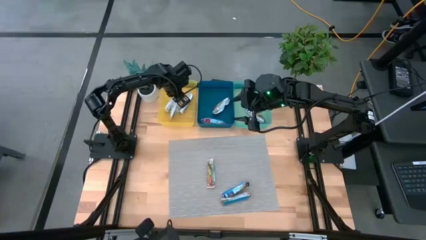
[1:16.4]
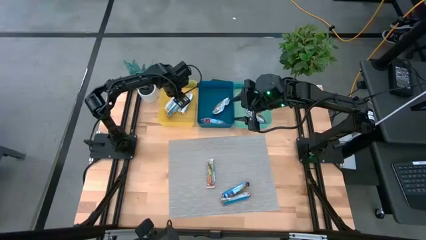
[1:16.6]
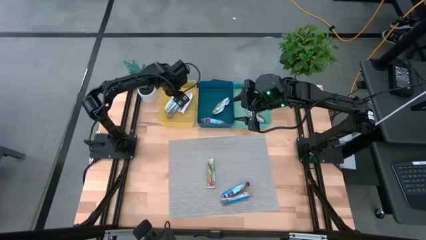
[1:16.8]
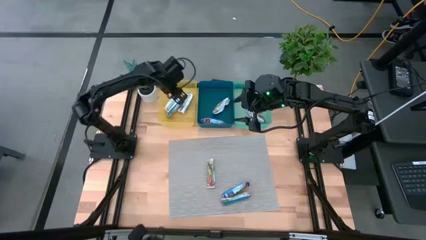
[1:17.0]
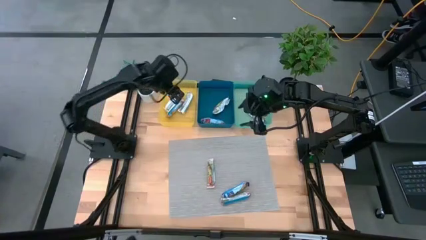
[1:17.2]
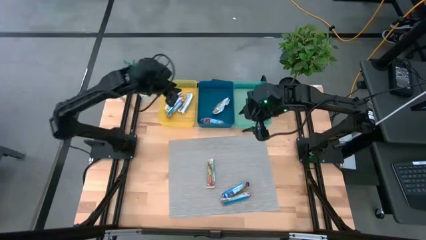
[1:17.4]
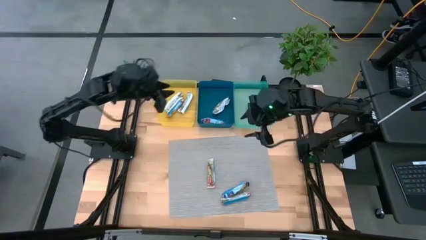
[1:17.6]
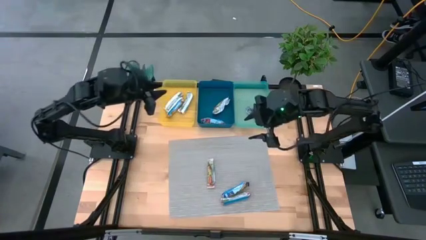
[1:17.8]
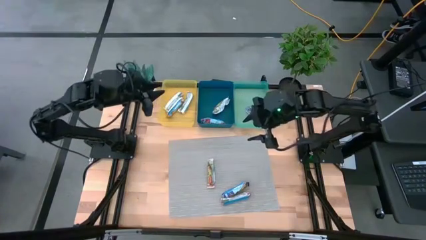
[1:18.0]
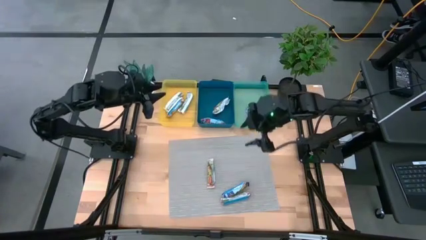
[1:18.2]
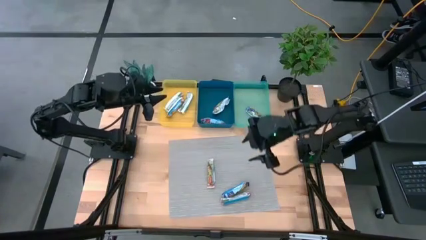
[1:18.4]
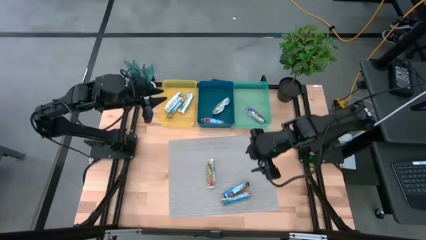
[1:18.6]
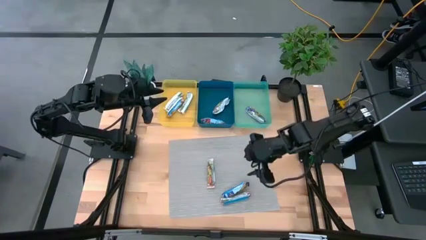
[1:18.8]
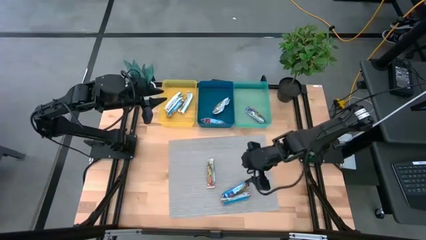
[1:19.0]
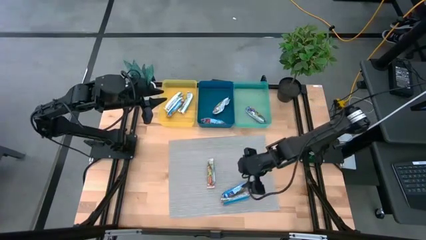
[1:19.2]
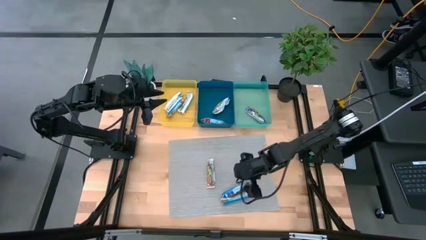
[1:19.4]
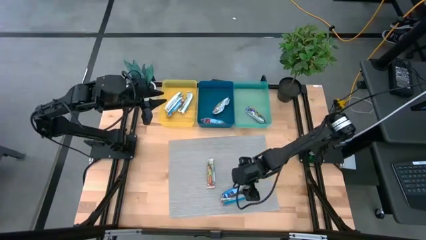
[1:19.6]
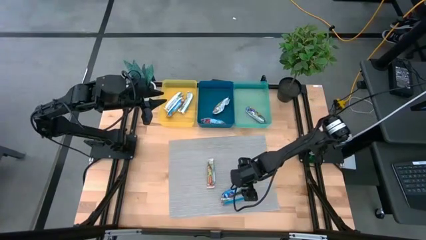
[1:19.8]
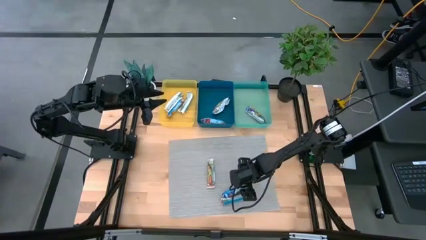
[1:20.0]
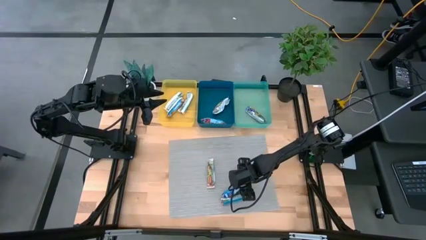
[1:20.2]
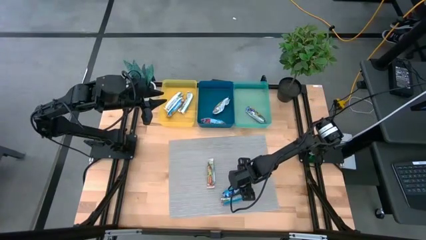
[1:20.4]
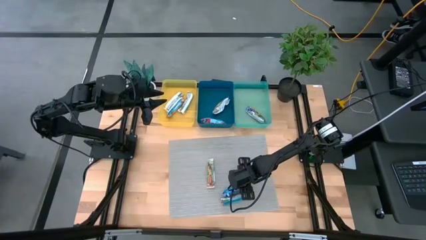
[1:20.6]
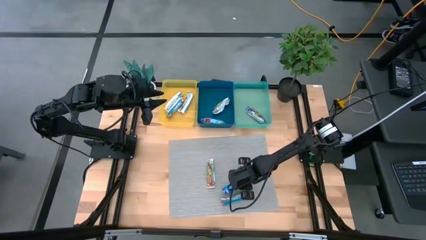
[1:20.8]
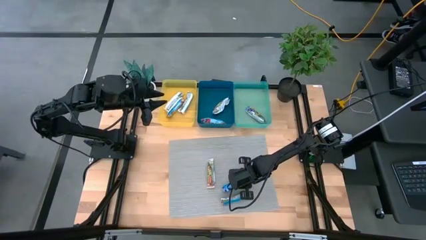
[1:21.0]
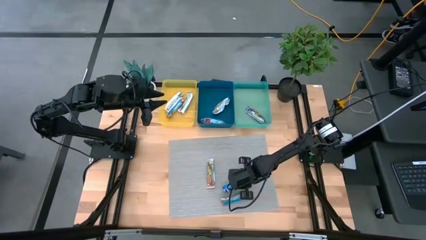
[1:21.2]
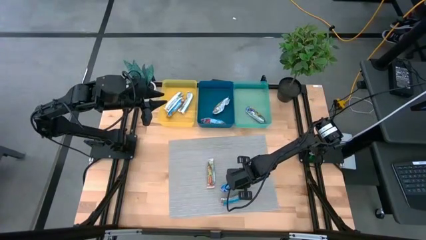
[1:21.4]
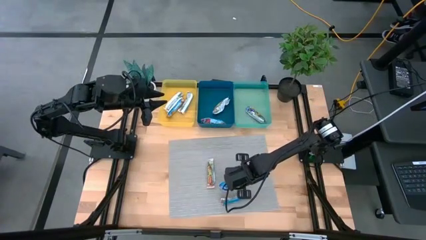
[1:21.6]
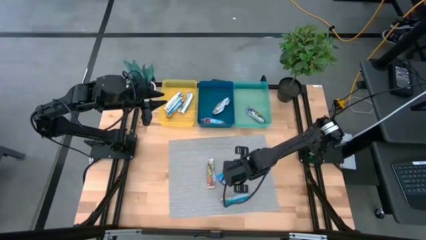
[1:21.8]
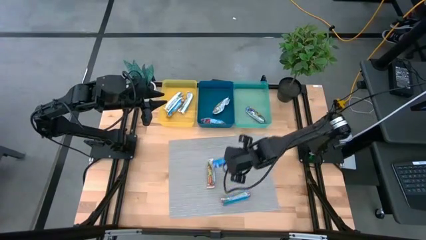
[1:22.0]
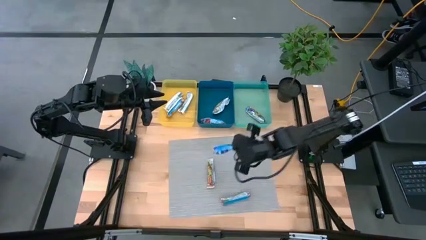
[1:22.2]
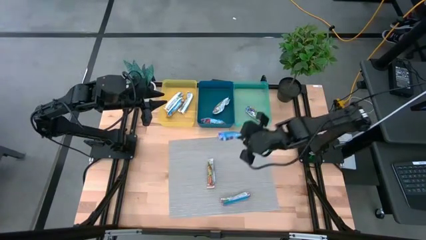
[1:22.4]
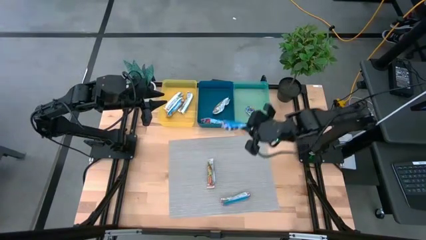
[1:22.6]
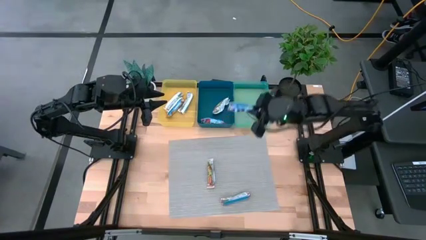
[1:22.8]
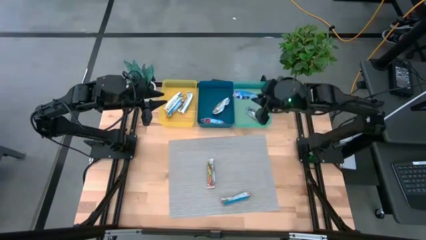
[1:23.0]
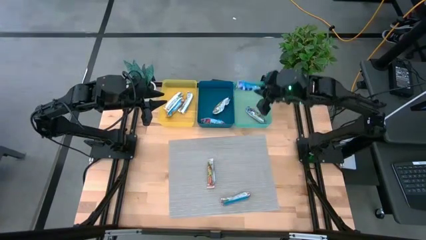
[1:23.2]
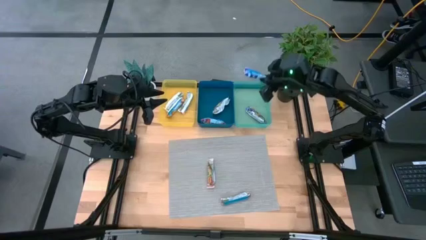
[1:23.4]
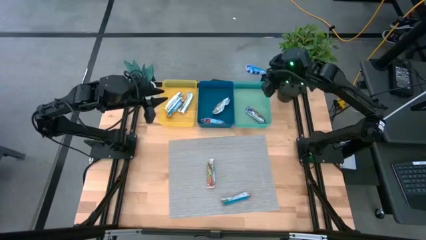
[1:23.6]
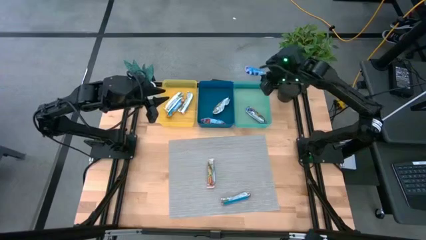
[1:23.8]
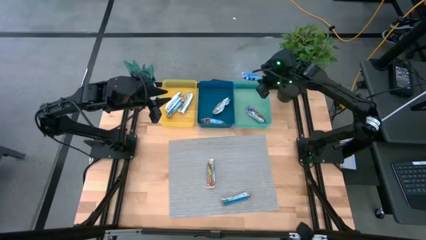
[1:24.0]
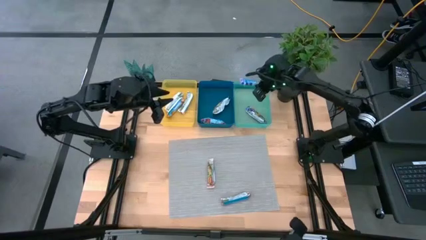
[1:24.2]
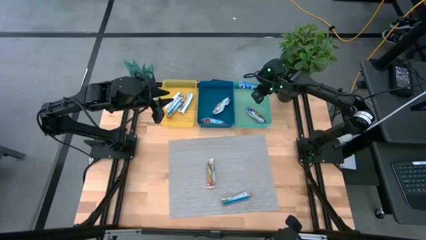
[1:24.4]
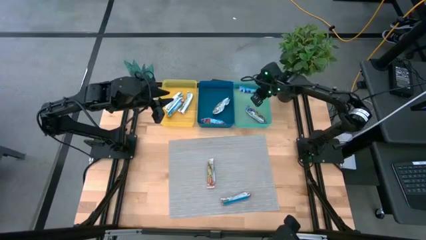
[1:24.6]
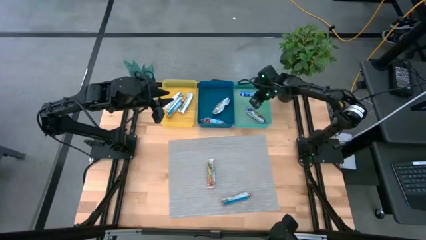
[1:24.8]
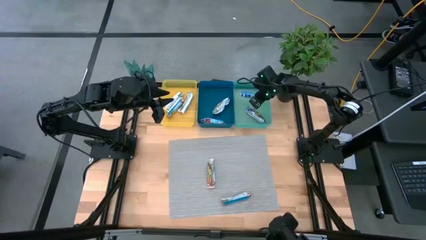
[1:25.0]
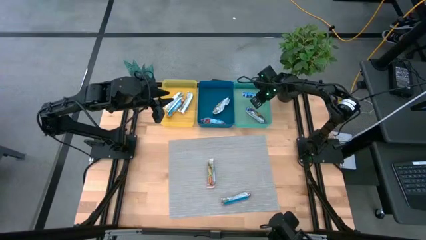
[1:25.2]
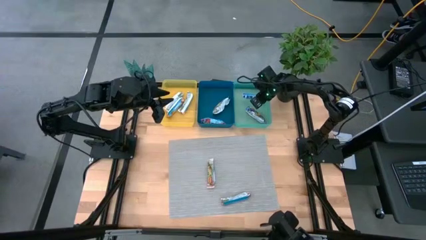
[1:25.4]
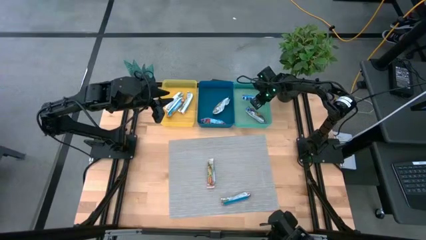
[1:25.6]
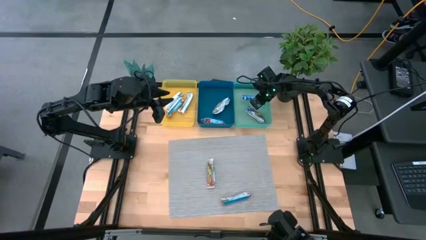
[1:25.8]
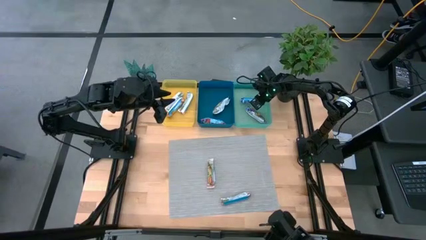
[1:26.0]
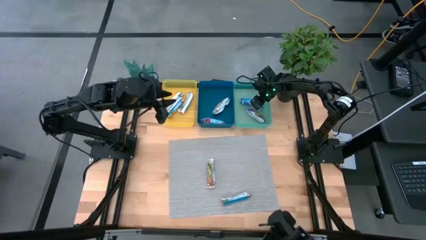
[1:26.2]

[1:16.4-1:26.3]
Task: Pick and place Granola Bars by type
Put the violet granola bar into the green bin
